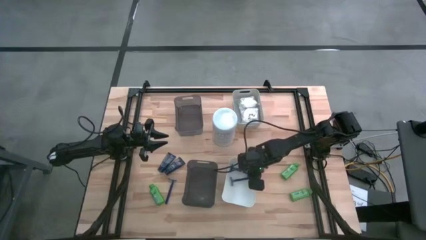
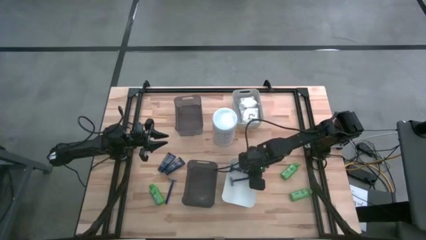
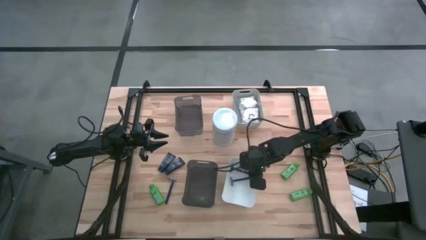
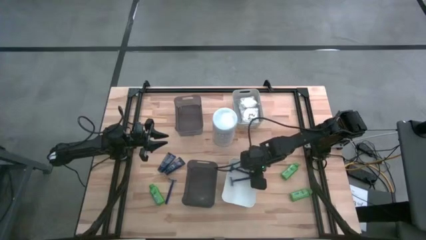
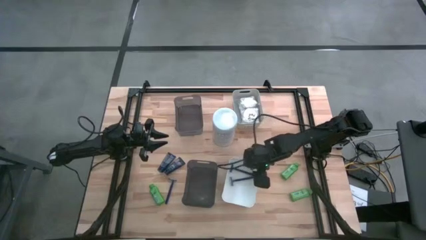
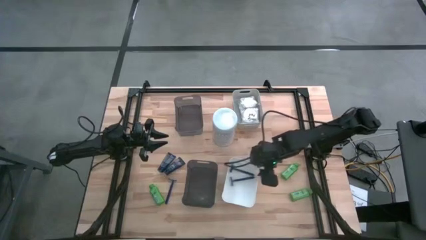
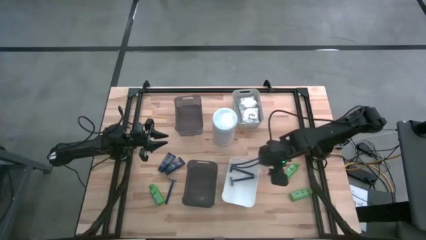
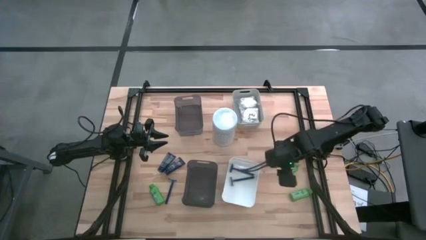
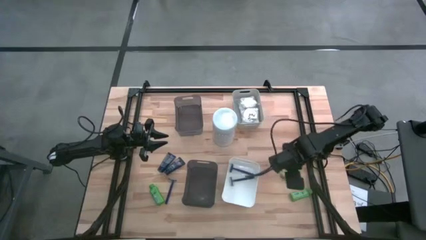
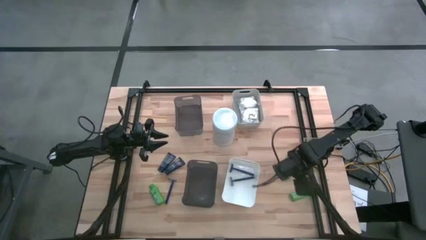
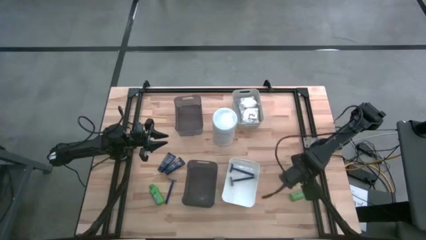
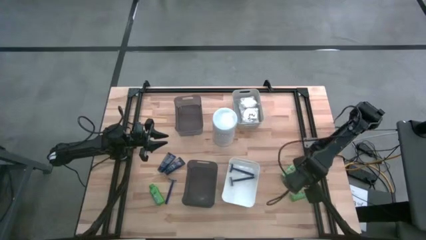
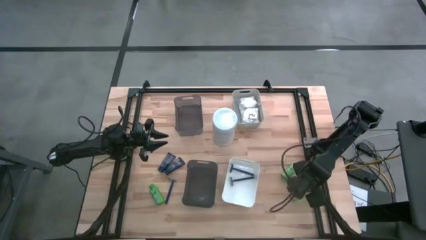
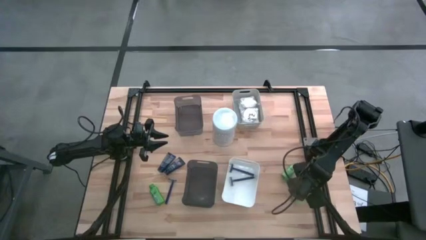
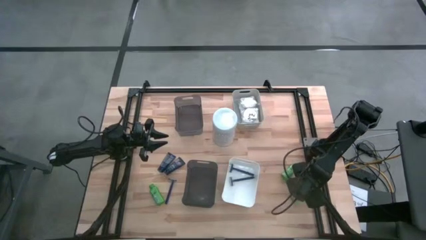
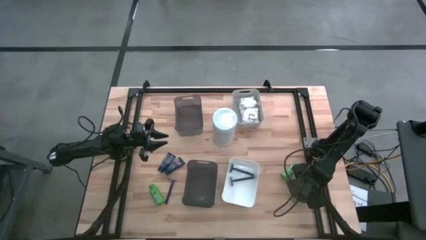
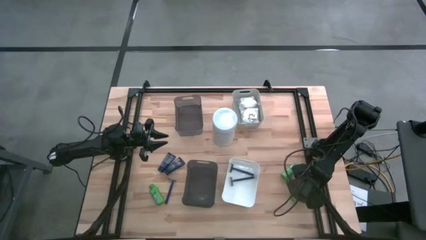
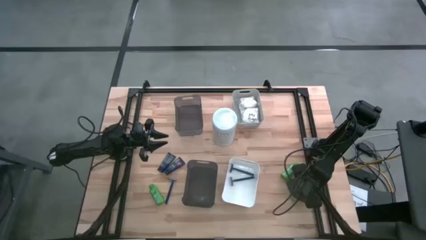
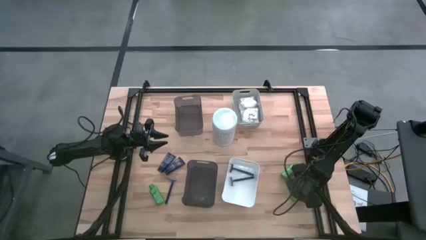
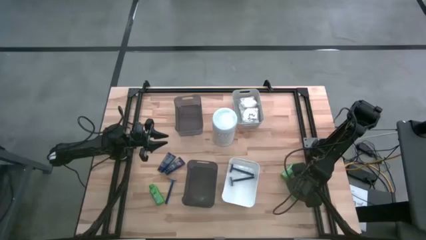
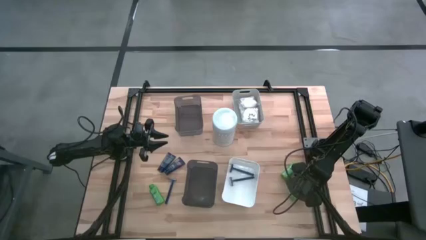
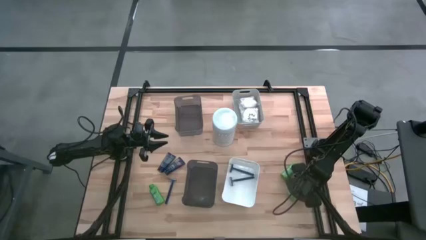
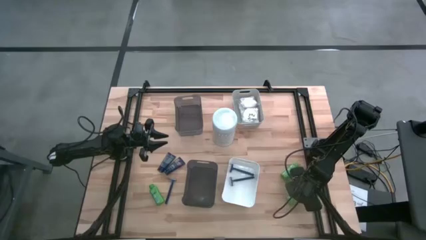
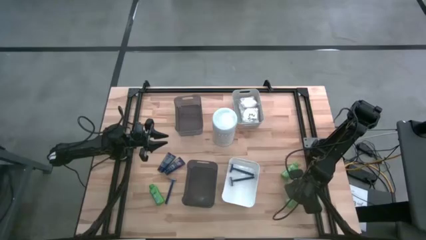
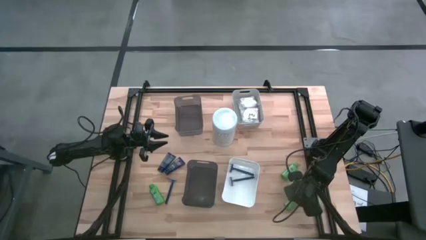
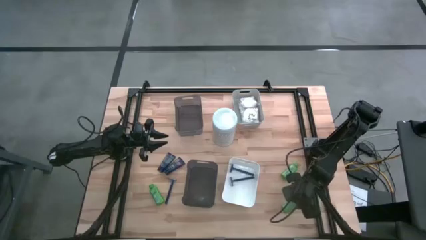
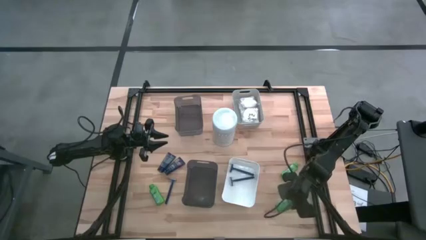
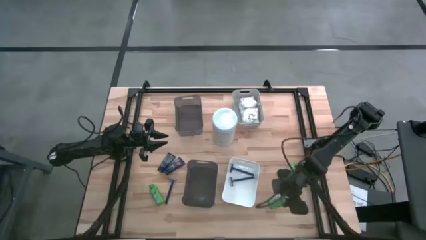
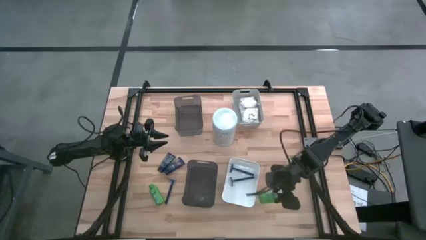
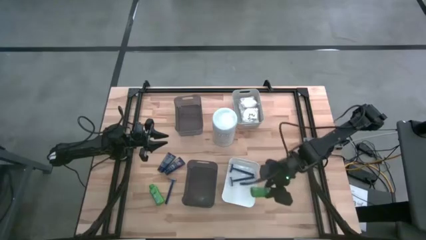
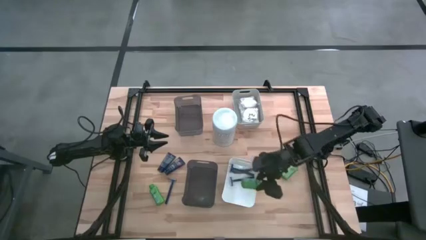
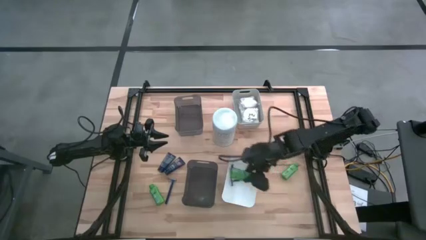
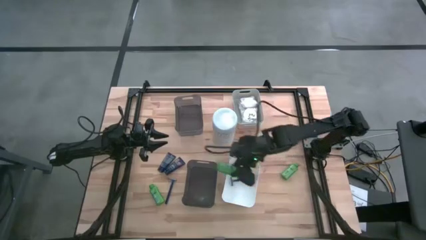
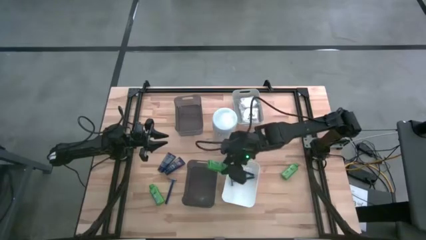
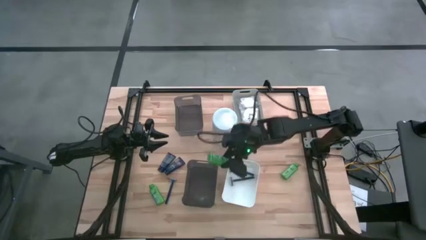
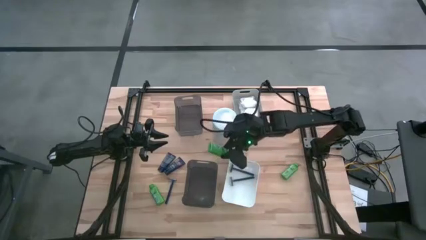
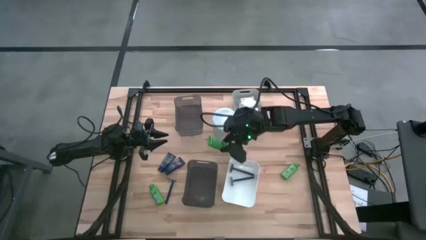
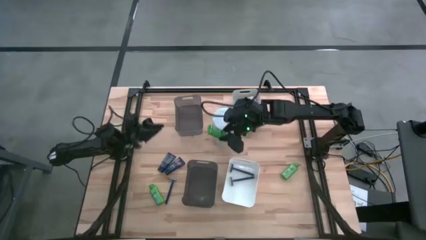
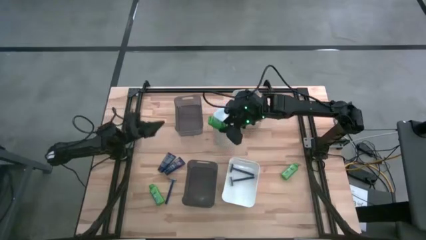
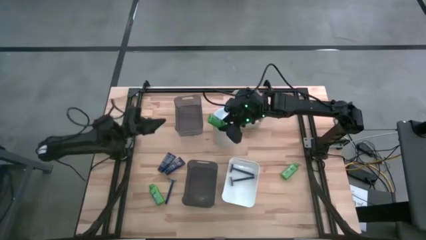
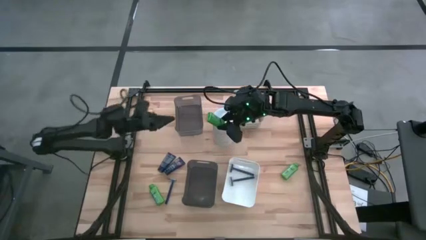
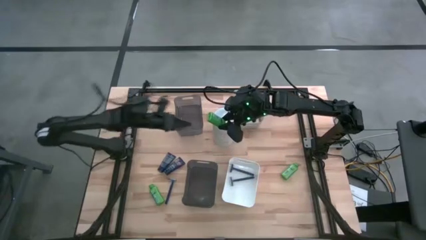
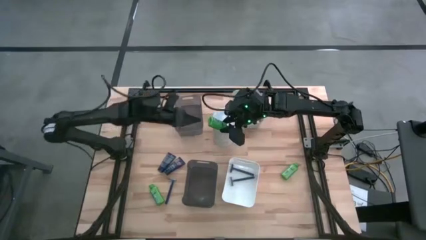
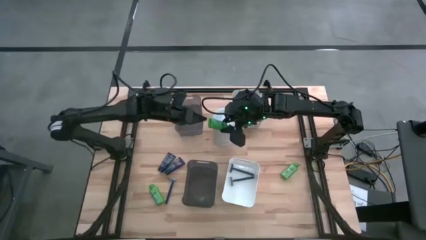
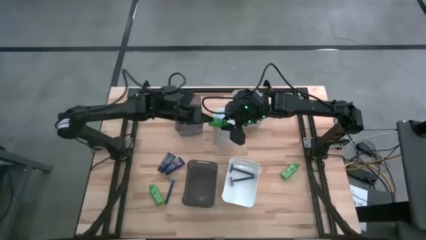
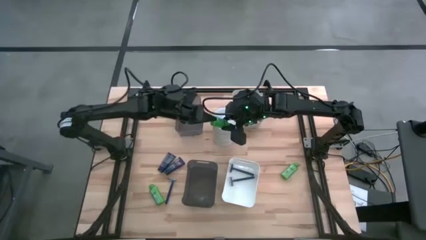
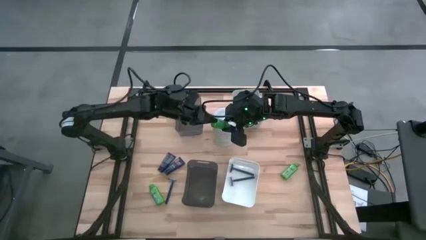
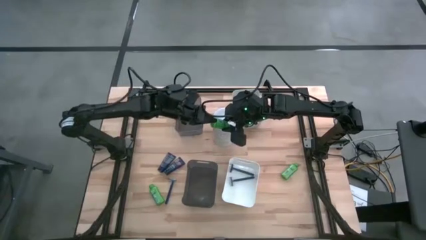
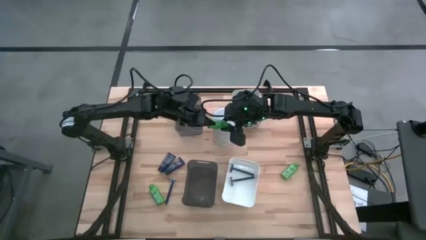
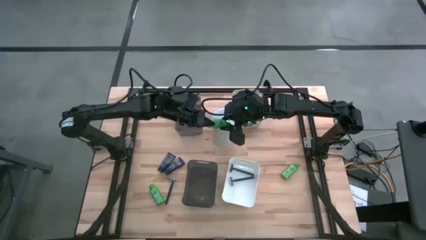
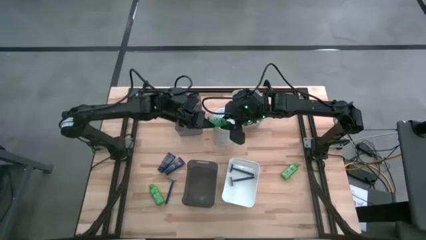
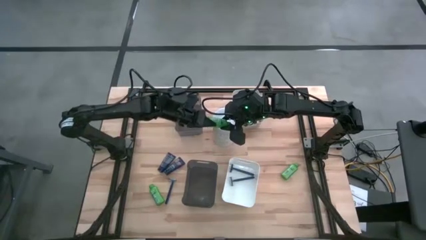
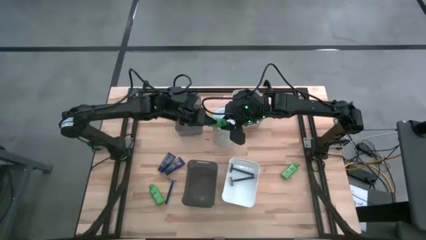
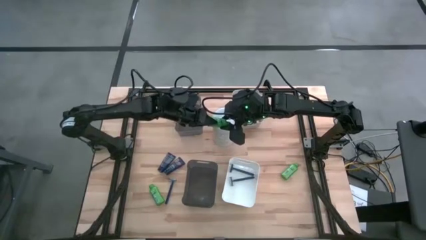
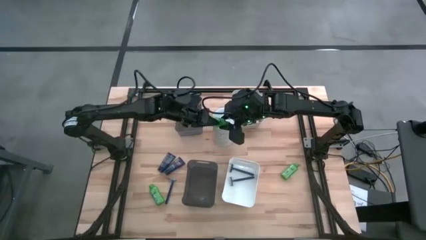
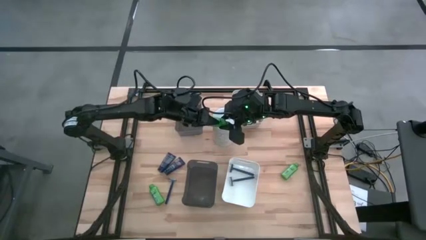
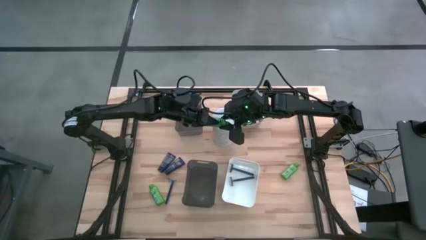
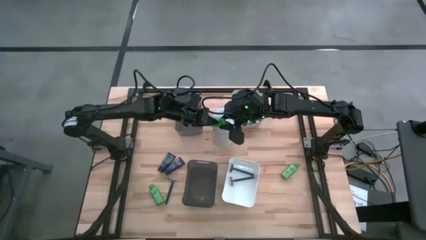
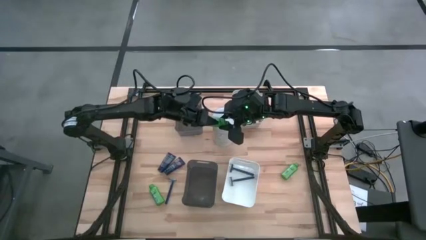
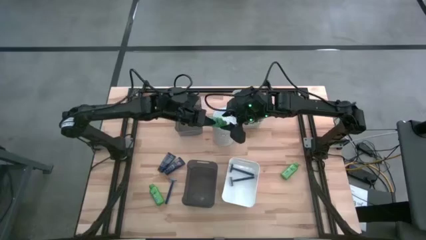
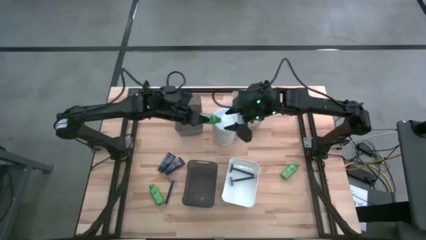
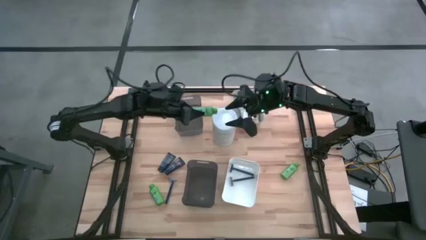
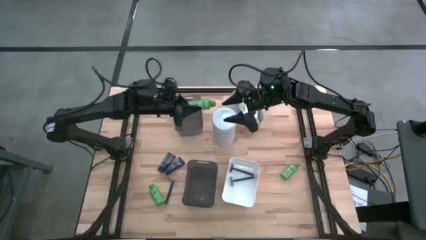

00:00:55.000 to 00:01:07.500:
Task: Pick & Place Travel size toiletries
Put the green shampoo bottle into the bottom black bin

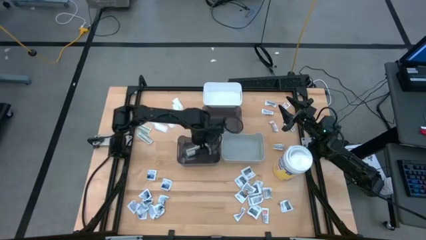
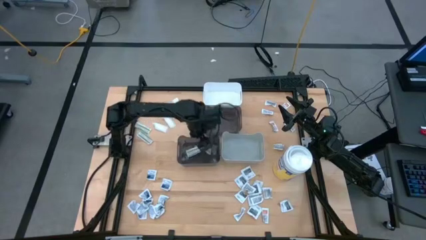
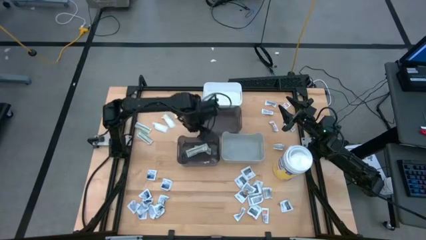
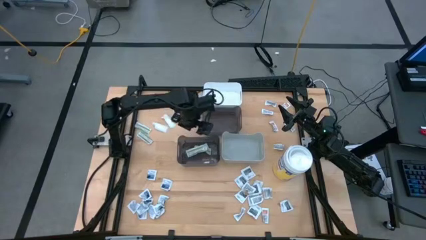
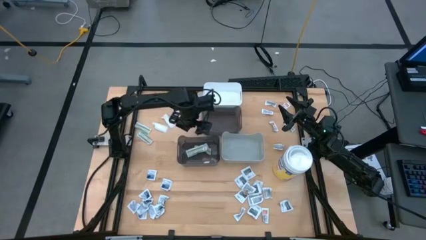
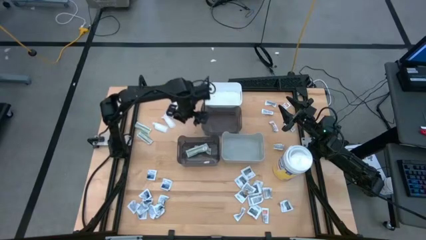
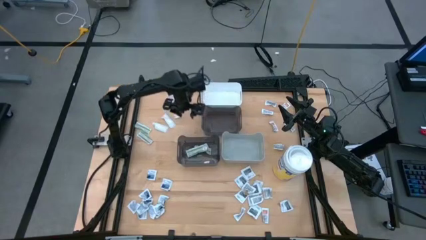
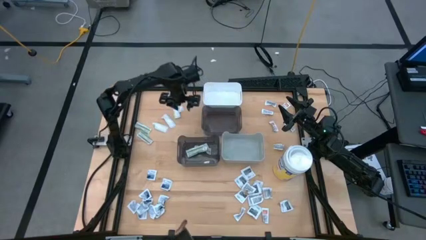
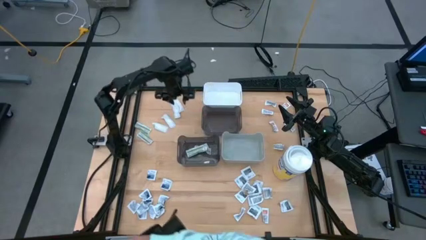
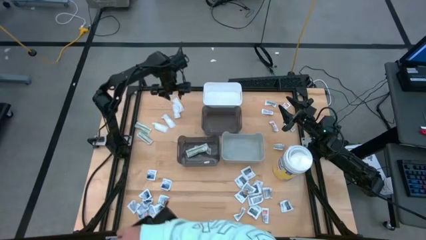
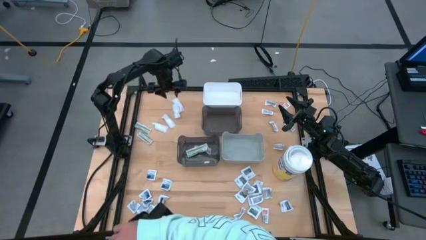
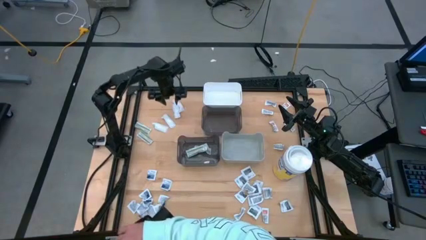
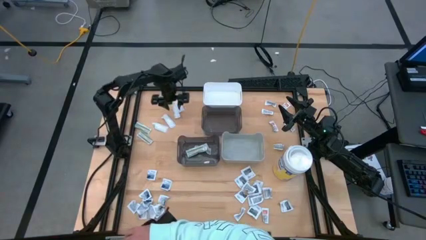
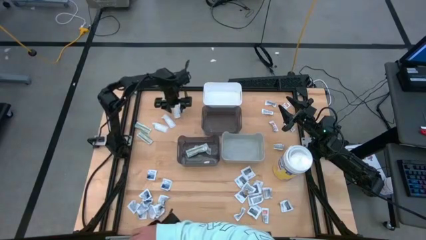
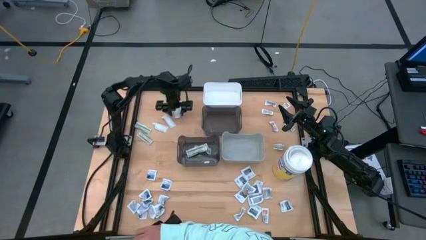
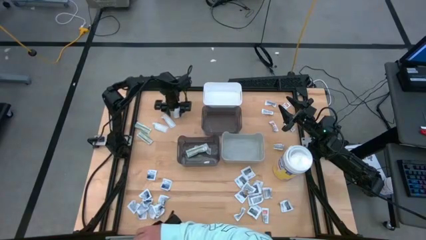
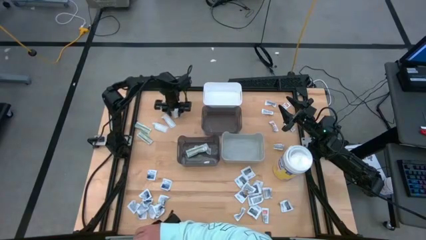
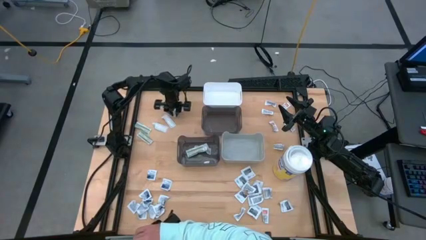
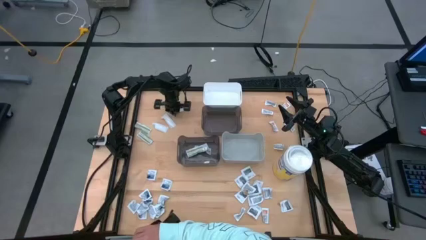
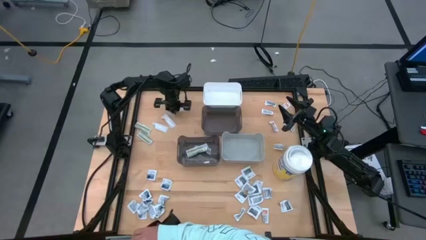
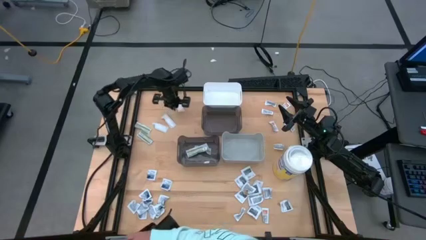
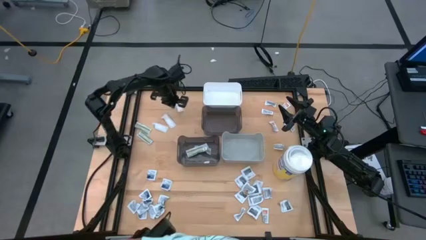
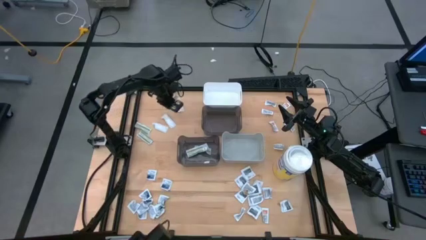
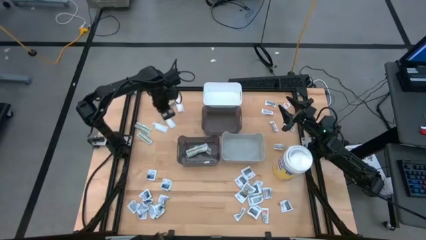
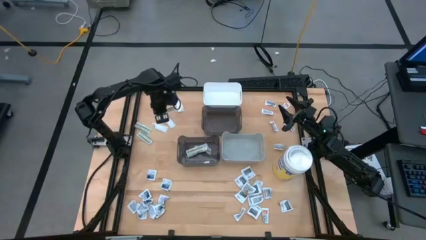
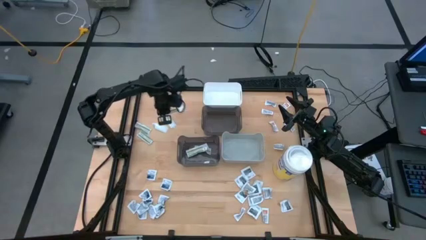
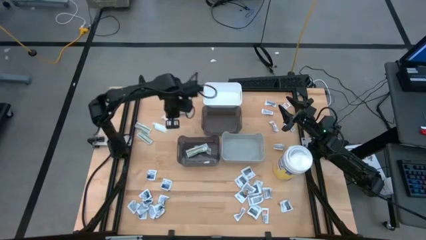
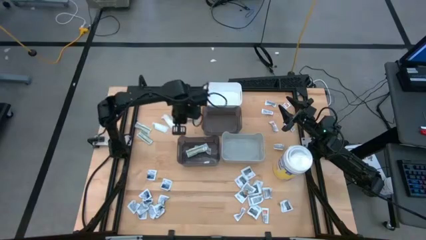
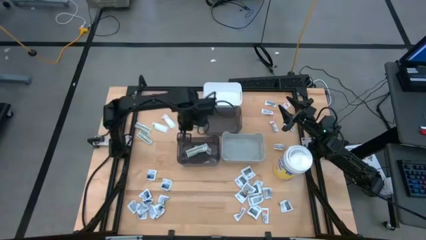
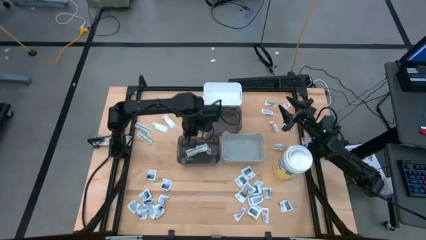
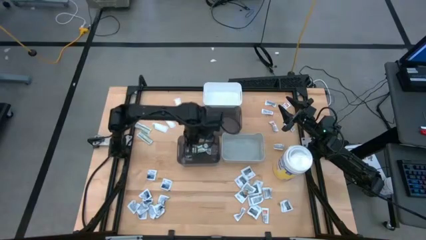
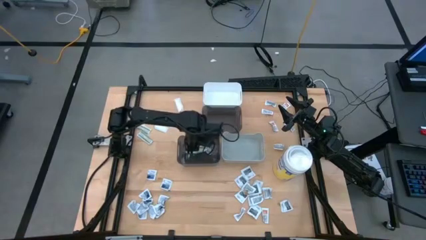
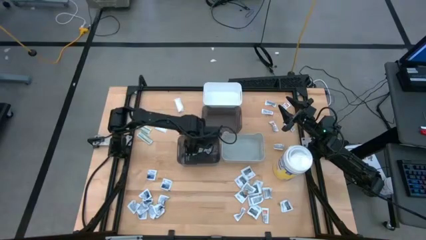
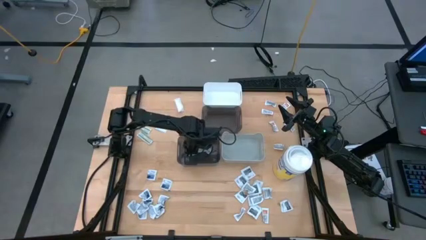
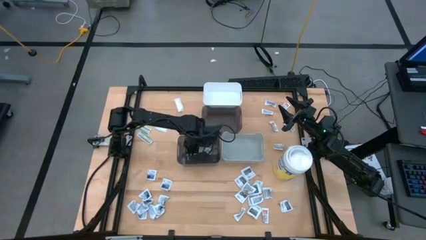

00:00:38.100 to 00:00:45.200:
Task: Pick & Place First Aid Supplies
Put the white bandage into the bottom black bin
